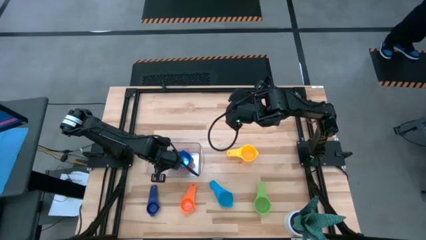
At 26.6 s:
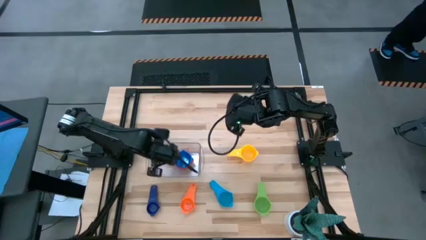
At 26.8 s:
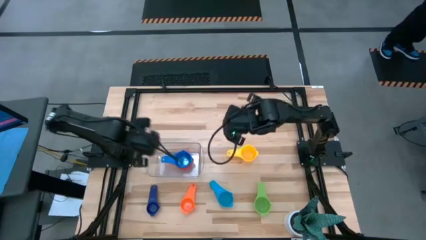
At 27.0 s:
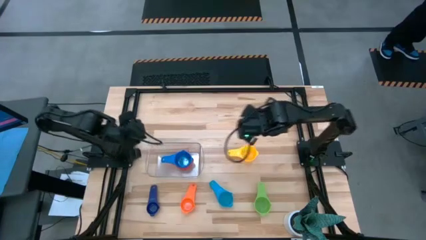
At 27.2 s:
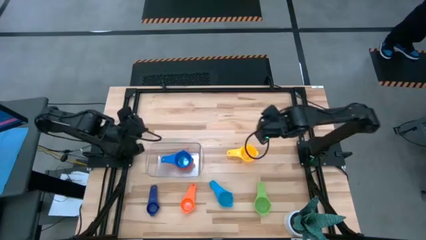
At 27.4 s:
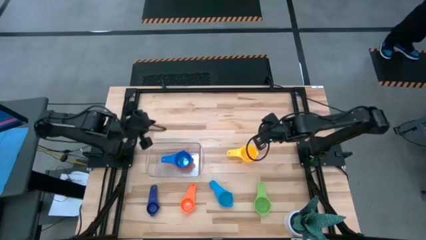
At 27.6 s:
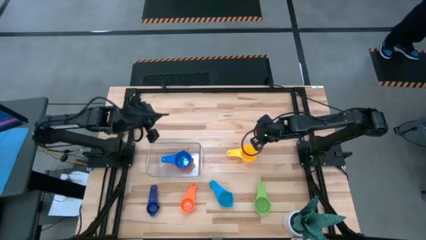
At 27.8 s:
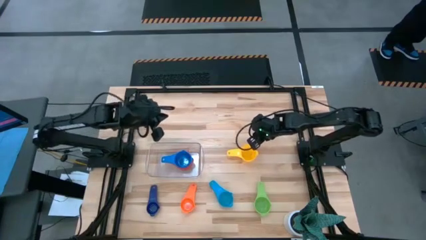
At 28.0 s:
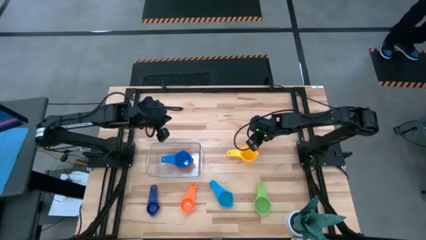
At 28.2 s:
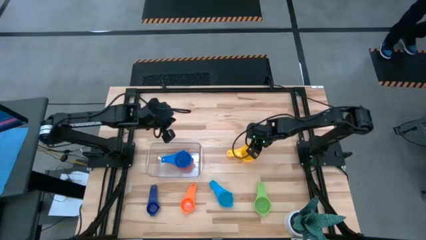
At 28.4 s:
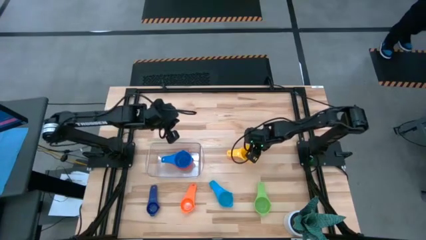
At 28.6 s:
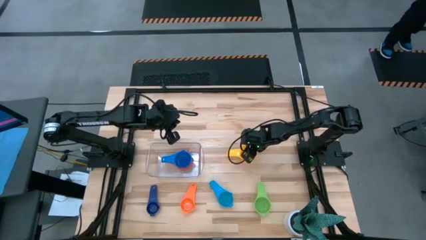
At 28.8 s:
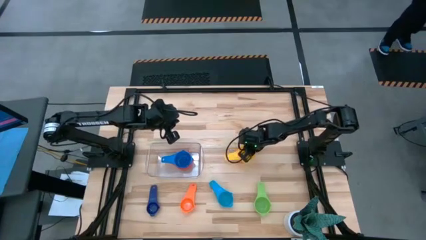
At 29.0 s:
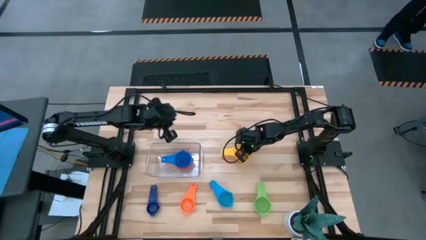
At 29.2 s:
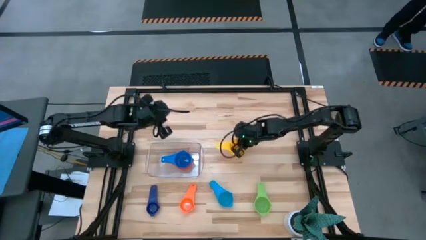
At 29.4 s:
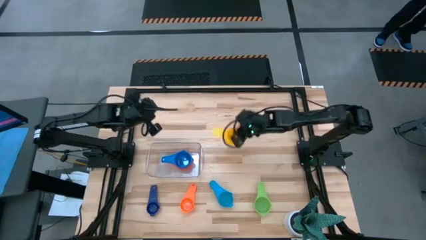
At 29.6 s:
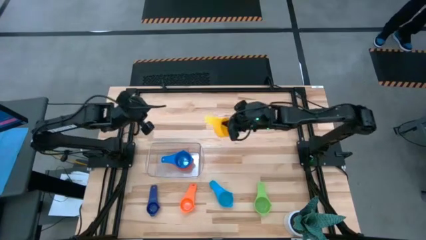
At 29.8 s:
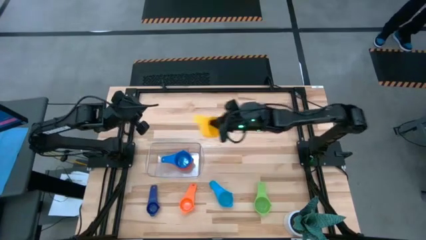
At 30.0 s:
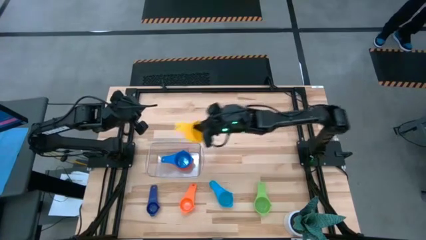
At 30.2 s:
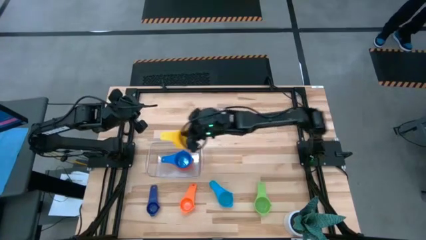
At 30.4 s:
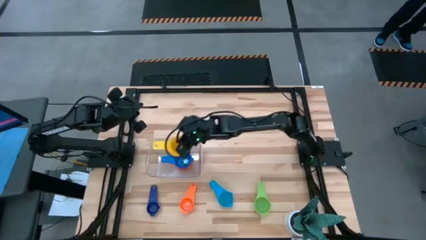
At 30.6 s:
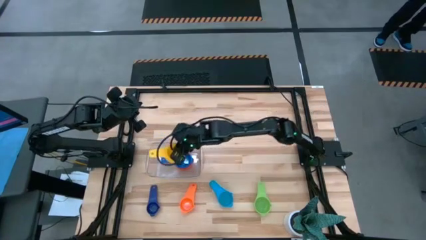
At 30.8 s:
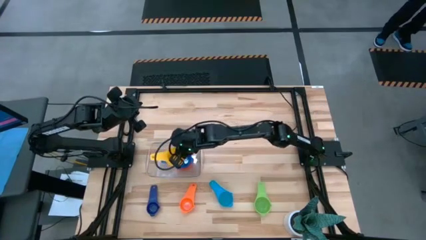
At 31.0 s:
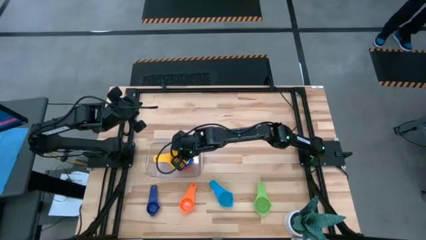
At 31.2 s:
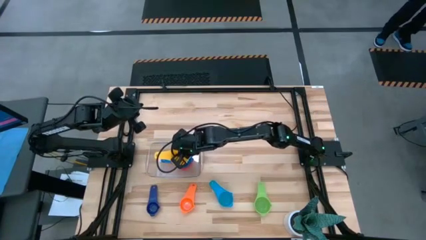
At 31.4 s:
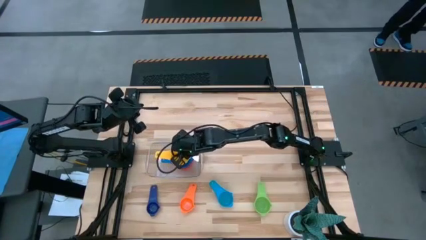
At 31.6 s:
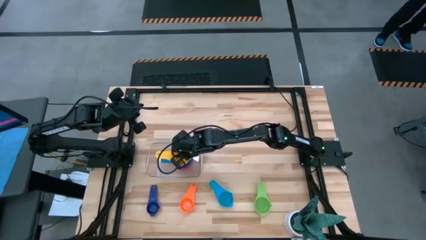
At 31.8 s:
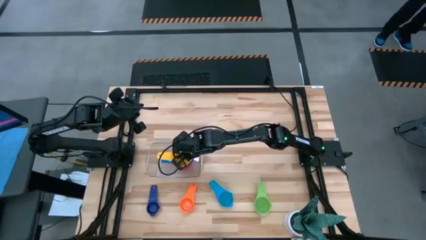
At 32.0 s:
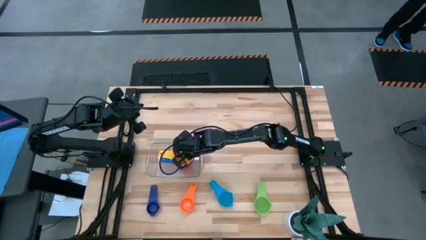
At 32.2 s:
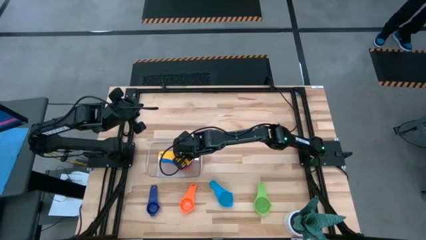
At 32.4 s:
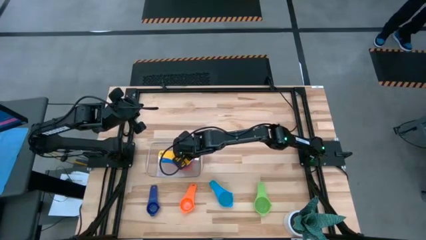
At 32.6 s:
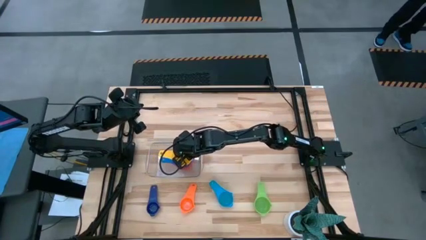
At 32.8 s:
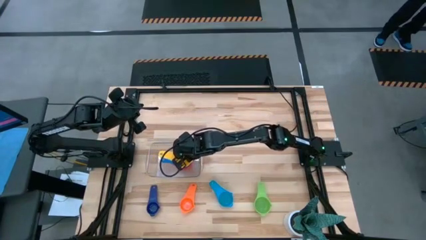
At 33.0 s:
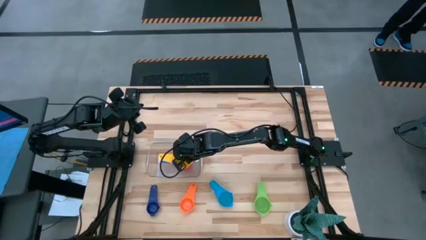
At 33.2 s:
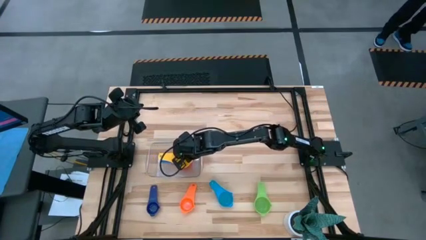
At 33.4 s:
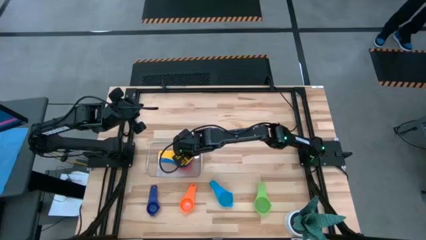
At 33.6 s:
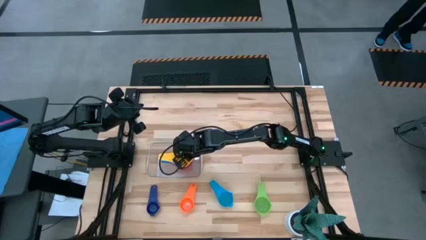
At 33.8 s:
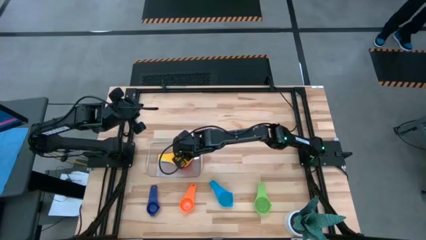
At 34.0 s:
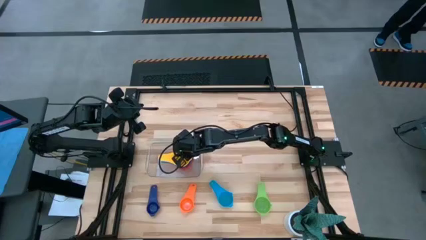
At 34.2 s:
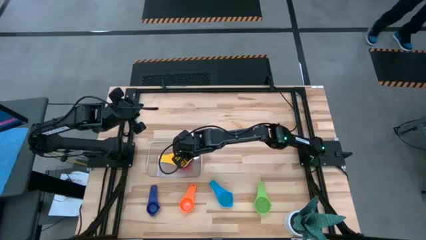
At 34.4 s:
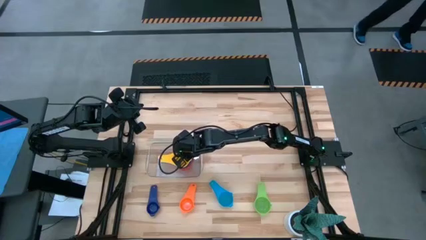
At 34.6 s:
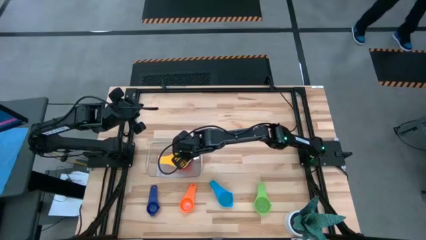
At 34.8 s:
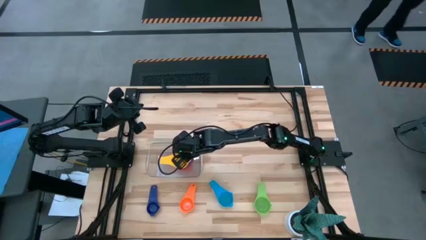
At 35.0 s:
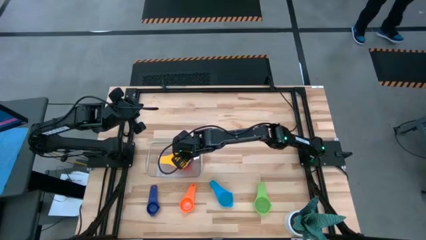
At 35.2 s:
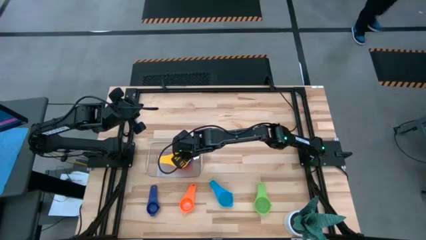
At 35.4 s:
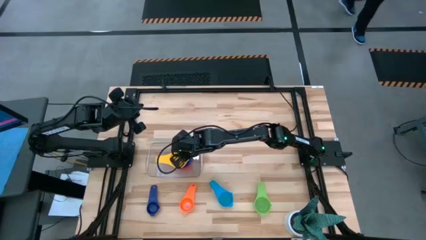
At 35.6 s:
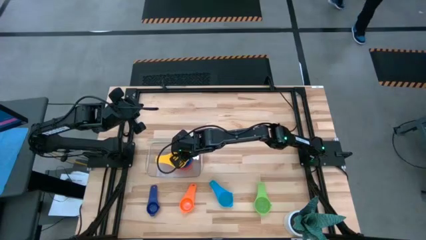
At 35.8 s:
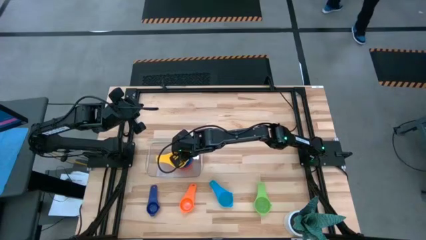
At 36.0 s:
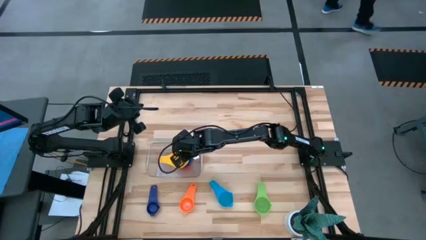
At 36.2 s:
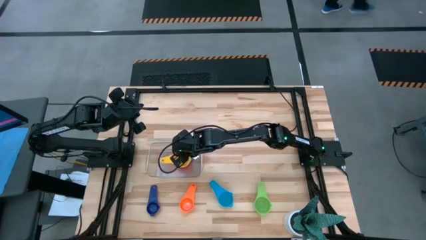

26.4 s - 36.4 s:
Task: Nest measuring cups in basket
Stack the yellow measuring cup on top of the blue measuring cup in the transparent bin

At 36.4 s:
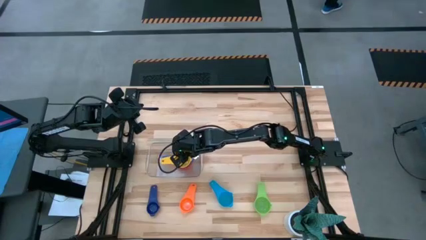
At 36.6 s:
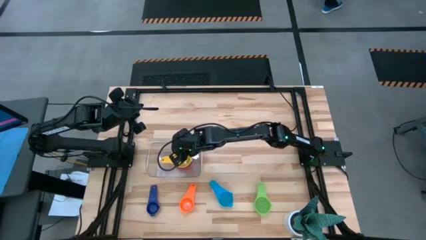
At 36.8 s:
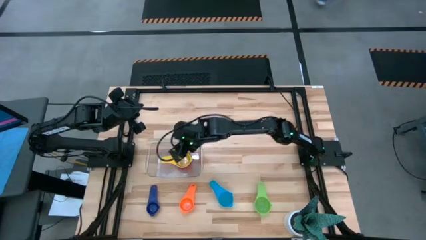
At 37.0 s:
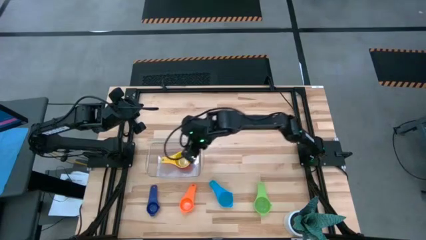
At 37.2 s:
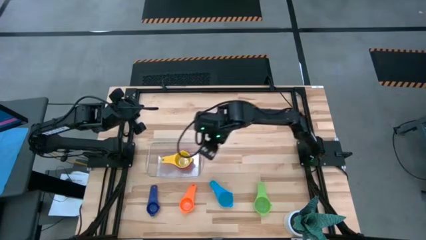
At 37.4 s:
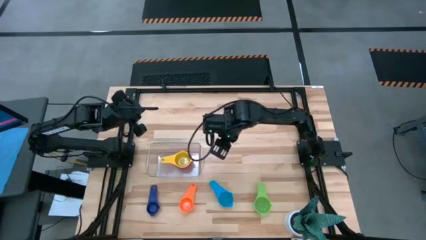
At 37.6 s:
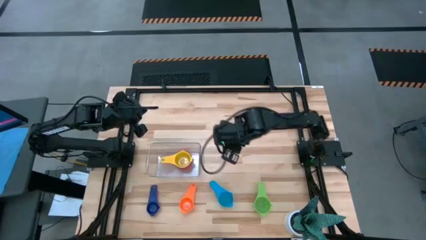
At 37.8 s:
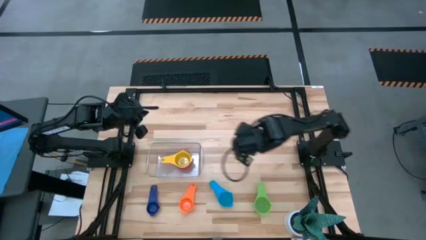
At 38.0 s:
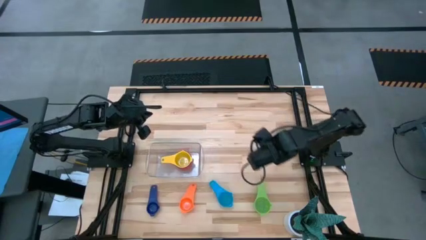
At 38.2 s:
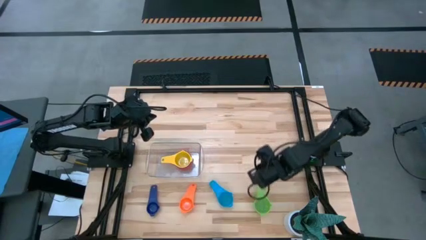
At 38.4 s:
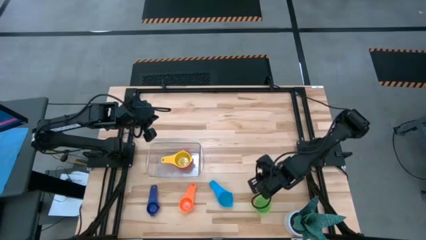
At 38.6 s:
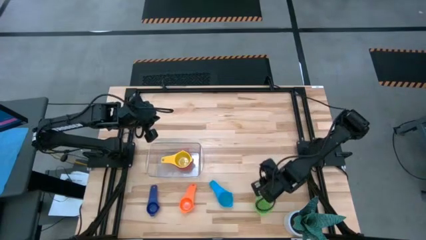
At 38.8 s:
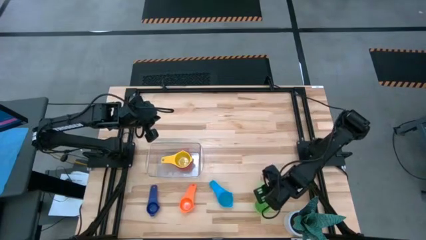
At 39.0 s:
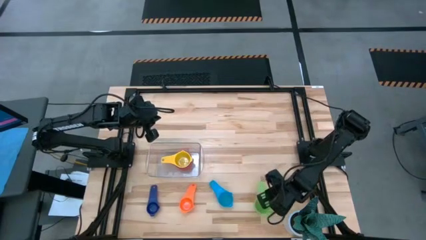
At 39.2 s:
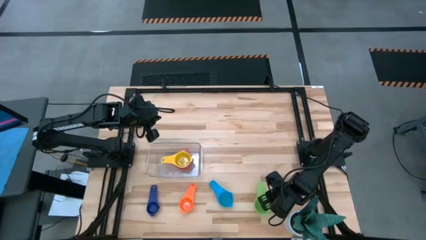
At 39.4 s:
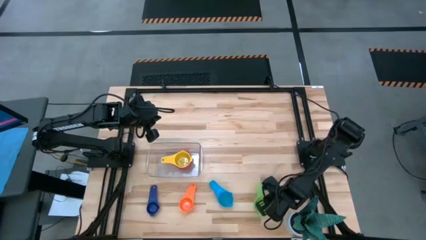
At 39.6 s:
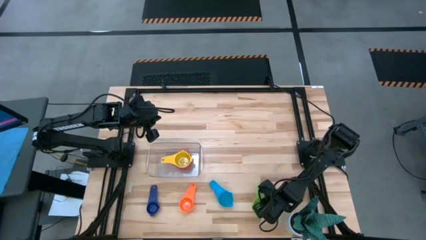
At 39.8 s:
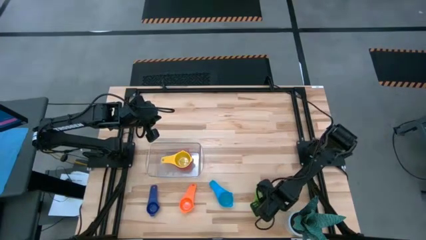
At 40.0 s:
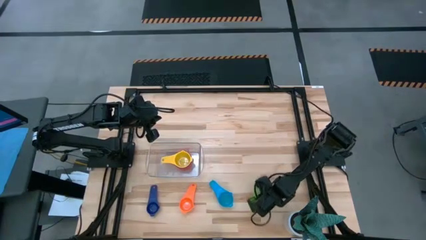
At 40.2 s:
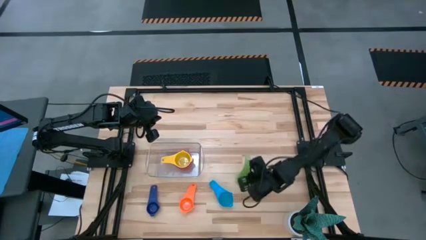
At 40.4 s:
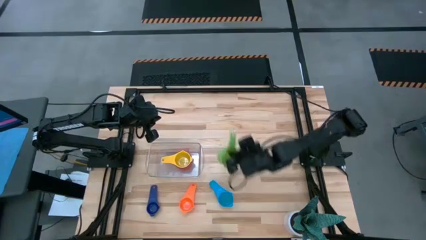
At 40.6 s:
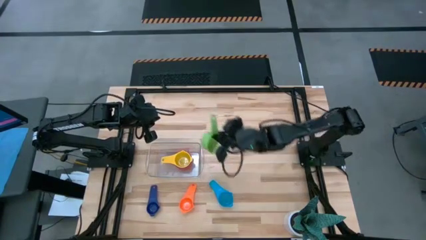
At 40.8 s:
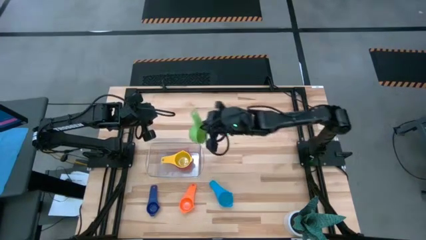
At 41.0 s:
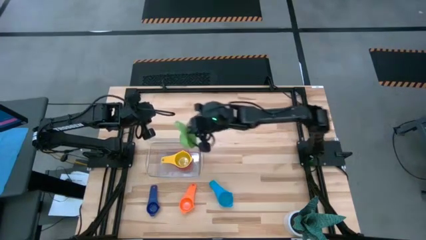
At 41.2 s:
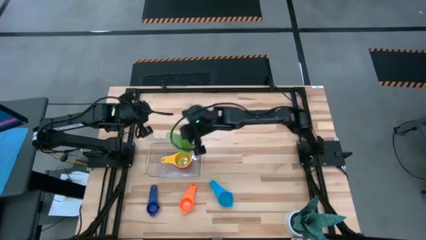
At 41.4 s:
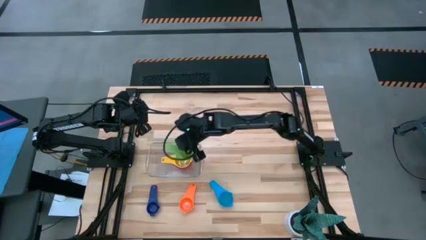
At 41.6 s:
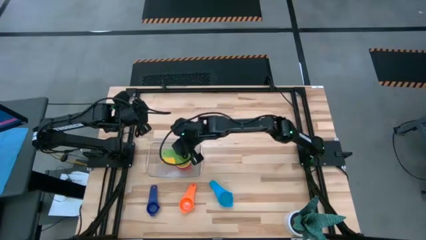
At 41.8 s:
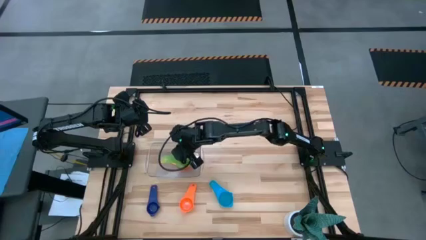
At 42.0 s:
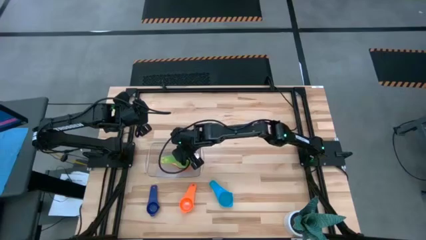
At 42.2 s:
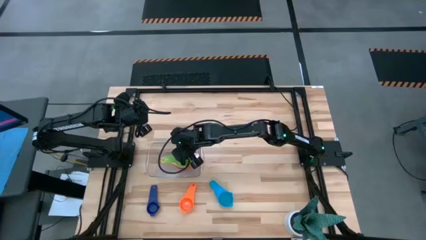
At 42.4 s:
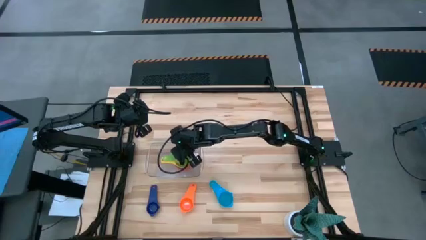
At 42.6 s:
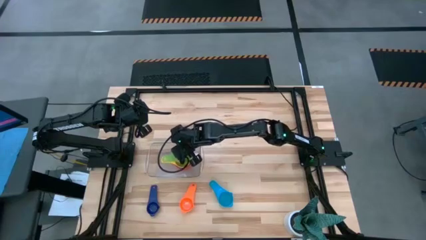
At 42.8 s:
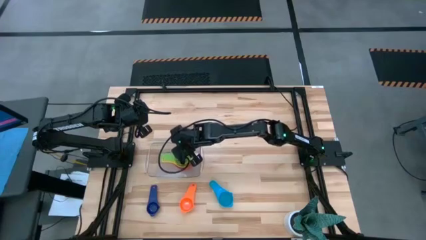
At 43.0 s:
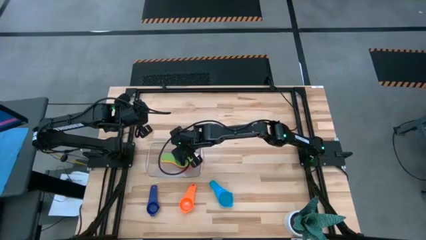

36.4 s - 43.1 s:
Stack the green measuring cup on top of the yellow measuring cup in the transparent bin
